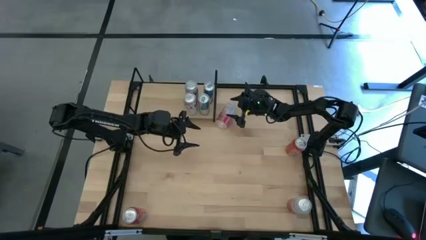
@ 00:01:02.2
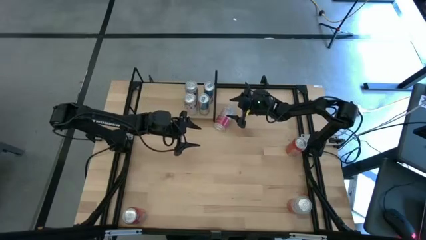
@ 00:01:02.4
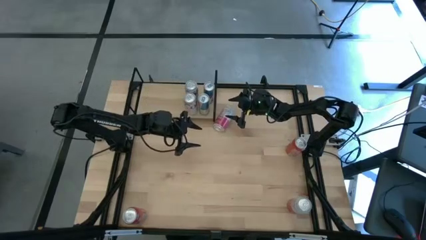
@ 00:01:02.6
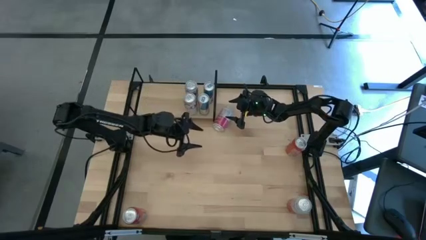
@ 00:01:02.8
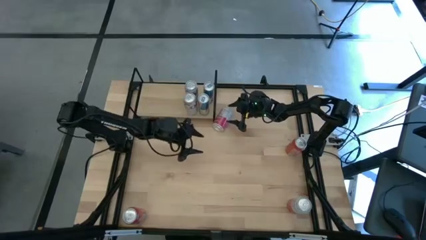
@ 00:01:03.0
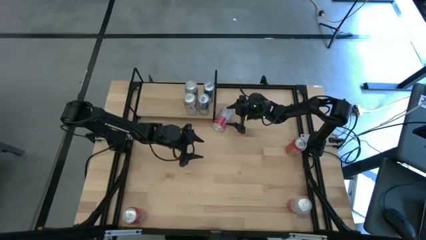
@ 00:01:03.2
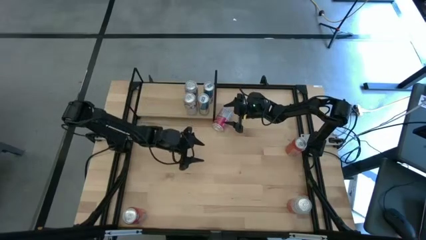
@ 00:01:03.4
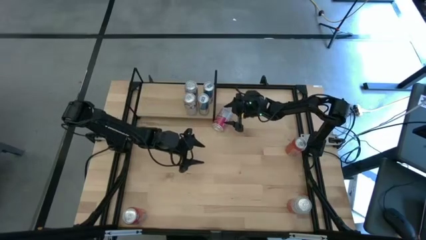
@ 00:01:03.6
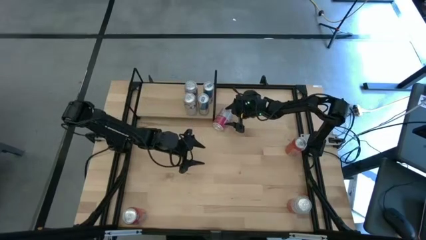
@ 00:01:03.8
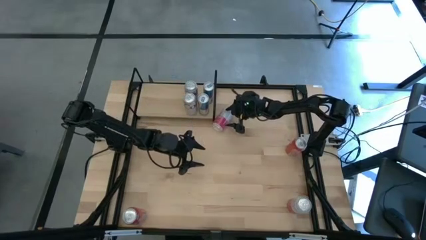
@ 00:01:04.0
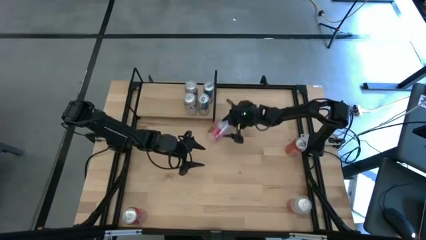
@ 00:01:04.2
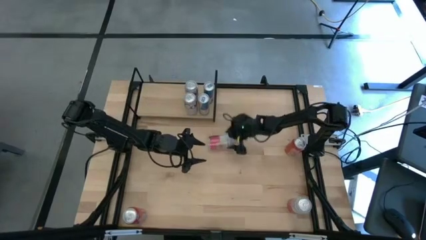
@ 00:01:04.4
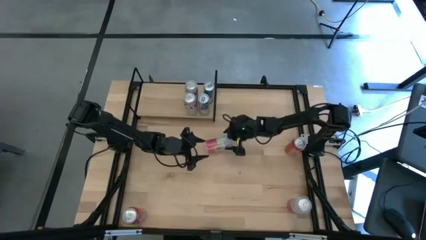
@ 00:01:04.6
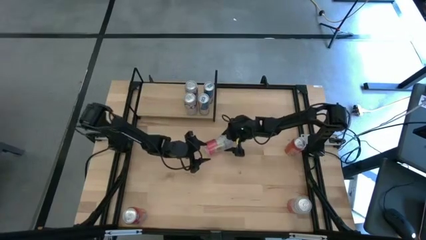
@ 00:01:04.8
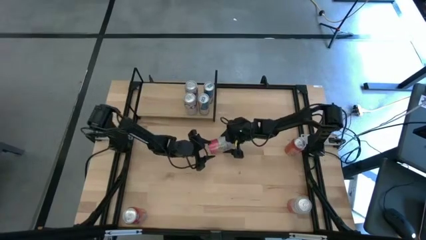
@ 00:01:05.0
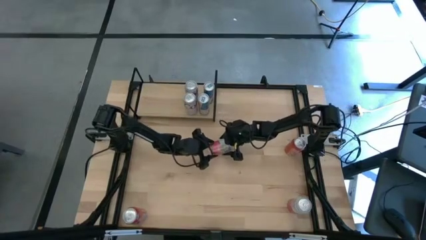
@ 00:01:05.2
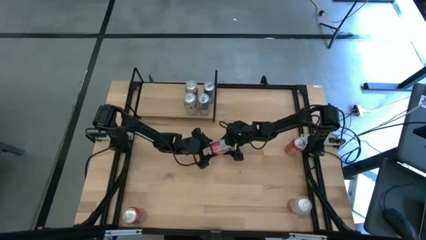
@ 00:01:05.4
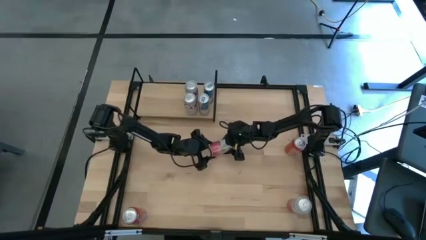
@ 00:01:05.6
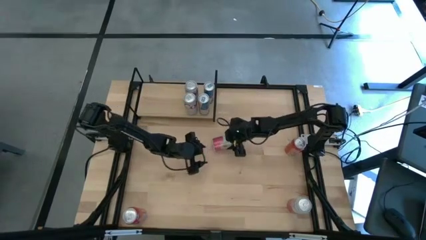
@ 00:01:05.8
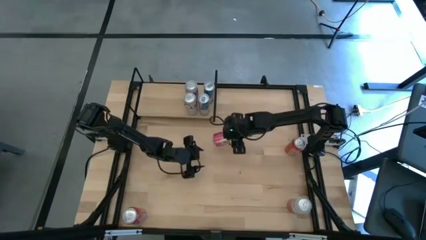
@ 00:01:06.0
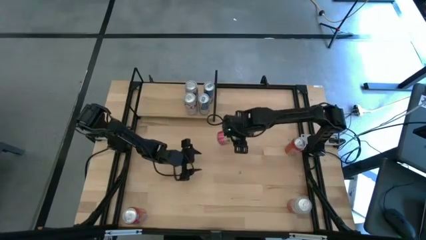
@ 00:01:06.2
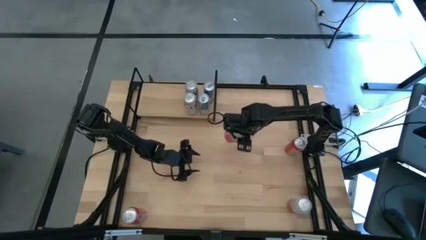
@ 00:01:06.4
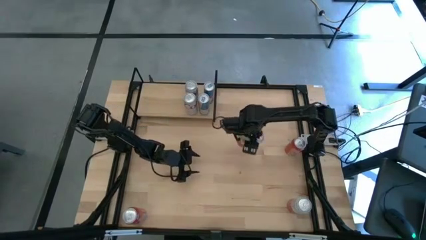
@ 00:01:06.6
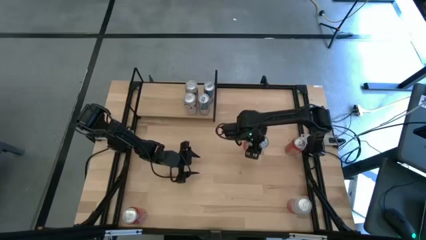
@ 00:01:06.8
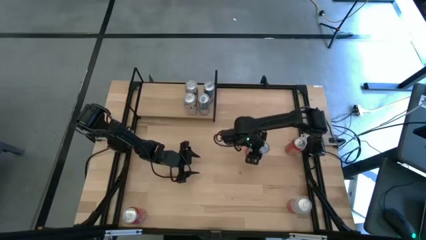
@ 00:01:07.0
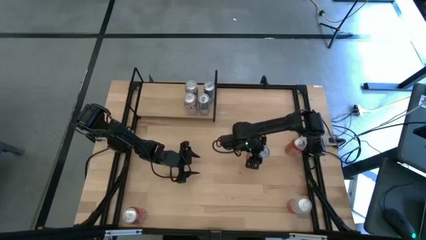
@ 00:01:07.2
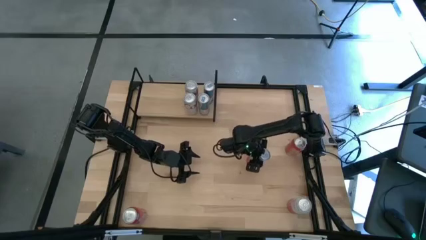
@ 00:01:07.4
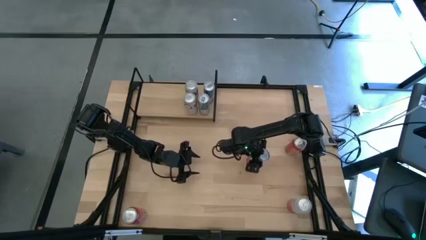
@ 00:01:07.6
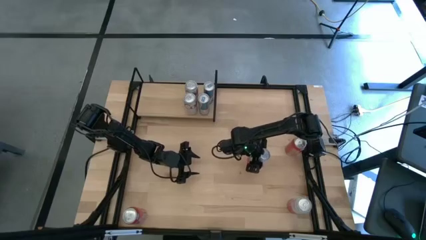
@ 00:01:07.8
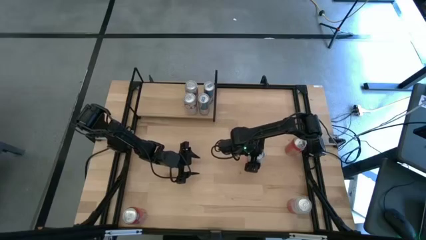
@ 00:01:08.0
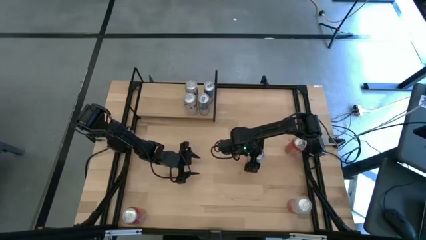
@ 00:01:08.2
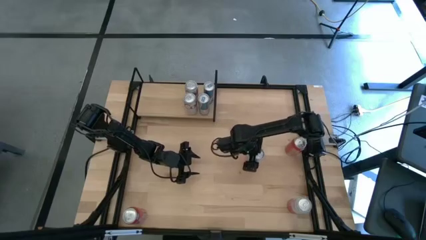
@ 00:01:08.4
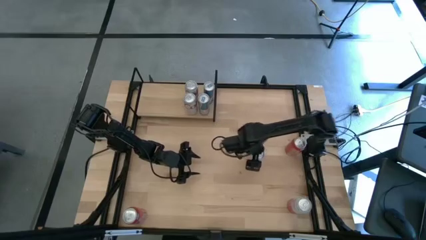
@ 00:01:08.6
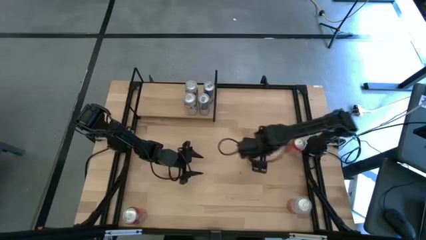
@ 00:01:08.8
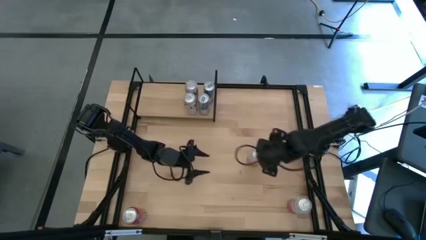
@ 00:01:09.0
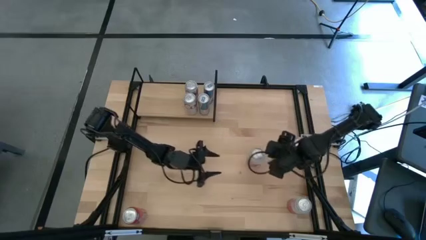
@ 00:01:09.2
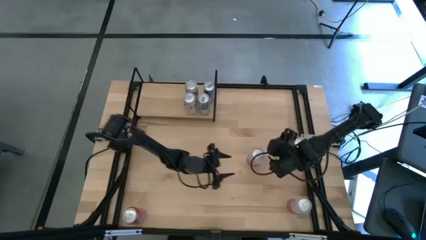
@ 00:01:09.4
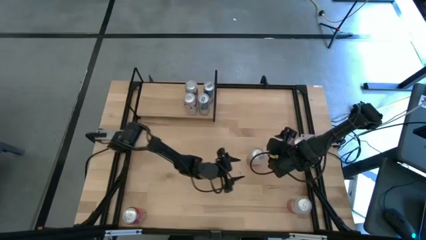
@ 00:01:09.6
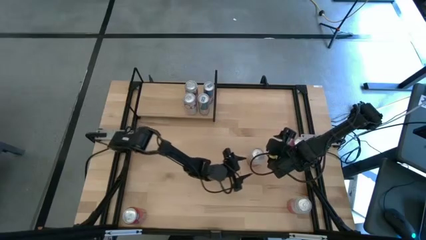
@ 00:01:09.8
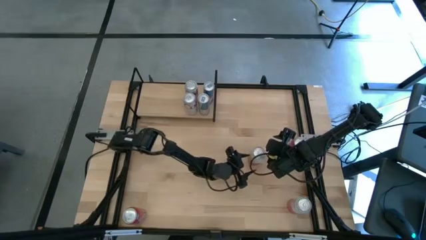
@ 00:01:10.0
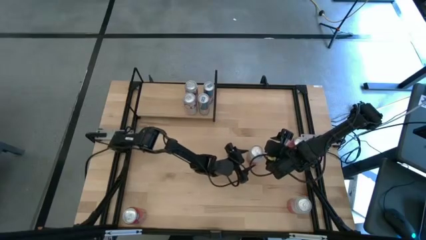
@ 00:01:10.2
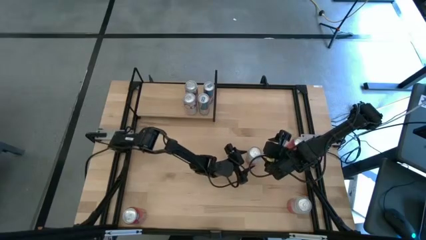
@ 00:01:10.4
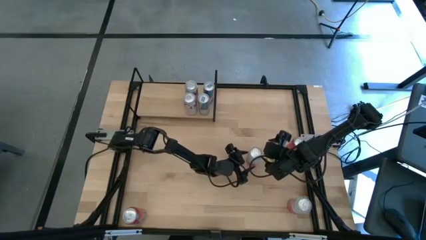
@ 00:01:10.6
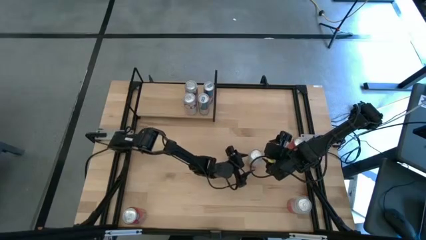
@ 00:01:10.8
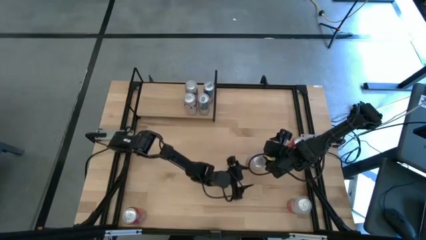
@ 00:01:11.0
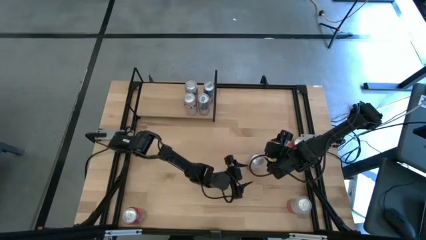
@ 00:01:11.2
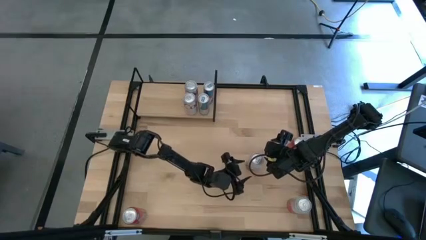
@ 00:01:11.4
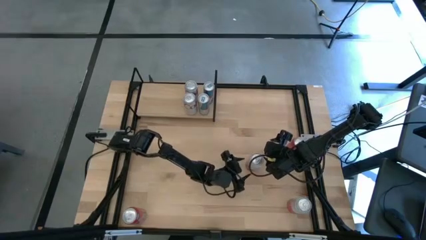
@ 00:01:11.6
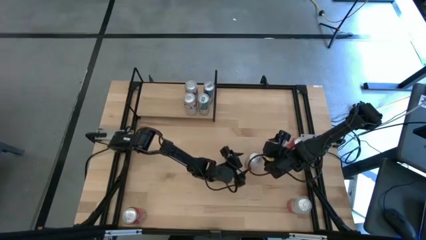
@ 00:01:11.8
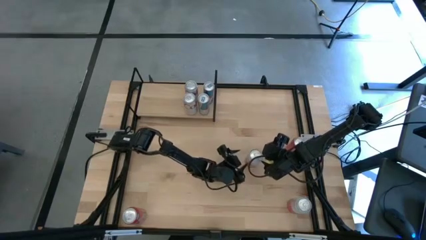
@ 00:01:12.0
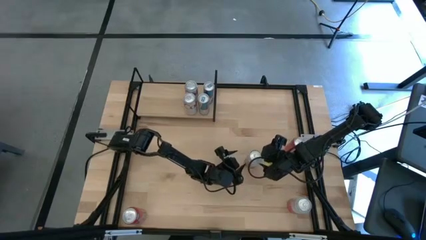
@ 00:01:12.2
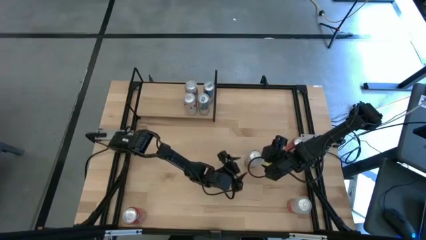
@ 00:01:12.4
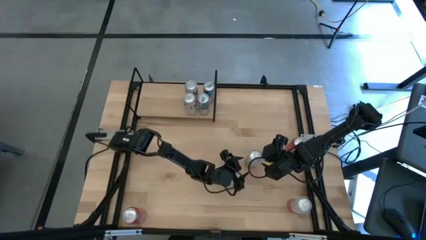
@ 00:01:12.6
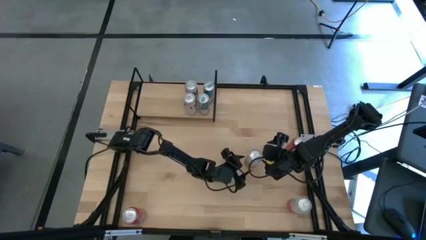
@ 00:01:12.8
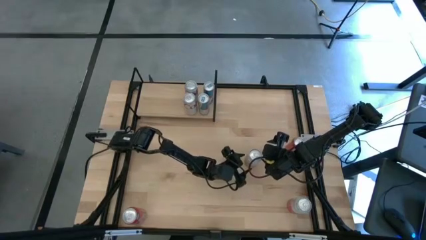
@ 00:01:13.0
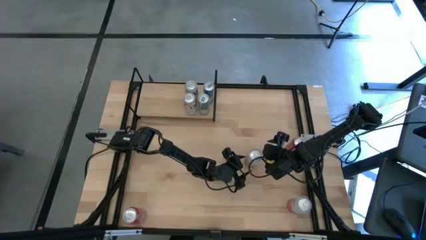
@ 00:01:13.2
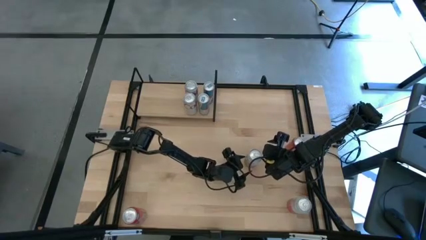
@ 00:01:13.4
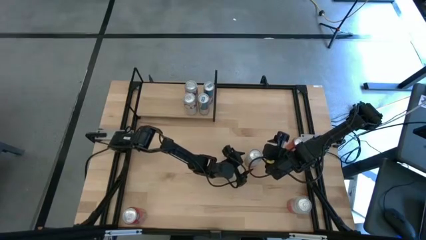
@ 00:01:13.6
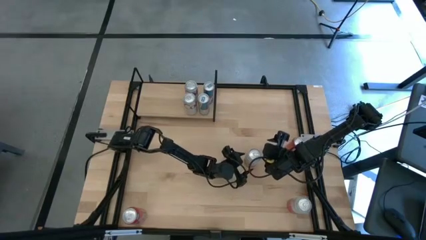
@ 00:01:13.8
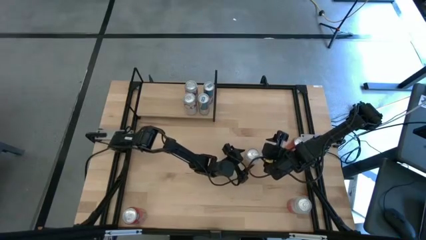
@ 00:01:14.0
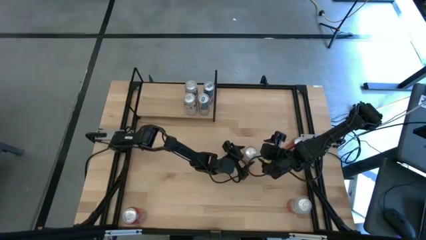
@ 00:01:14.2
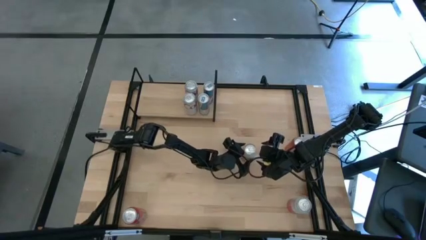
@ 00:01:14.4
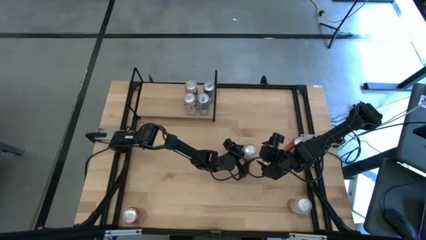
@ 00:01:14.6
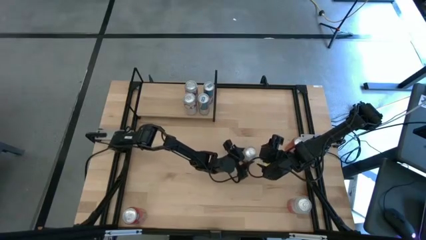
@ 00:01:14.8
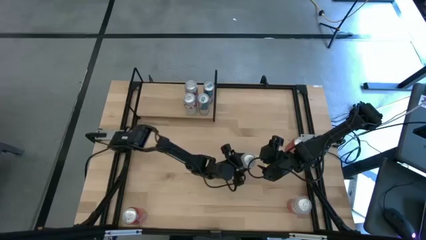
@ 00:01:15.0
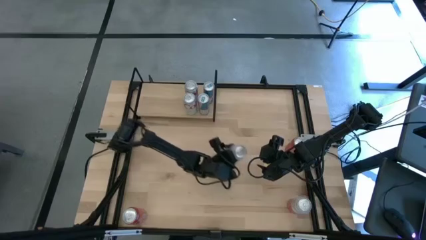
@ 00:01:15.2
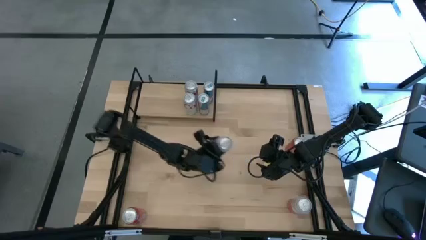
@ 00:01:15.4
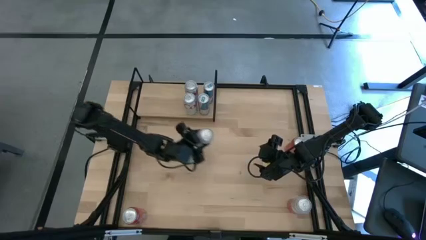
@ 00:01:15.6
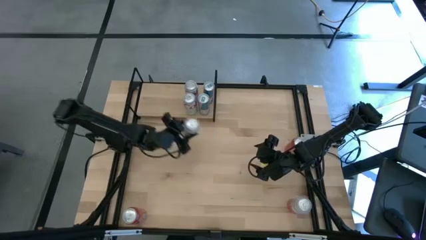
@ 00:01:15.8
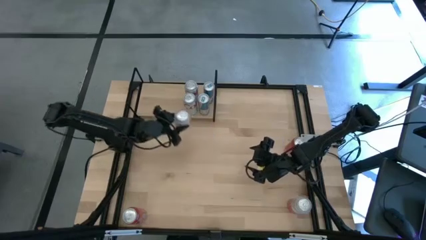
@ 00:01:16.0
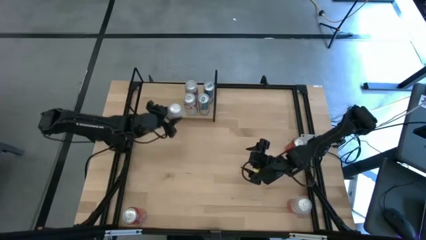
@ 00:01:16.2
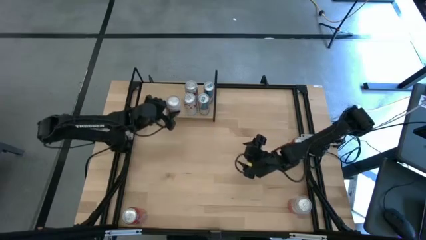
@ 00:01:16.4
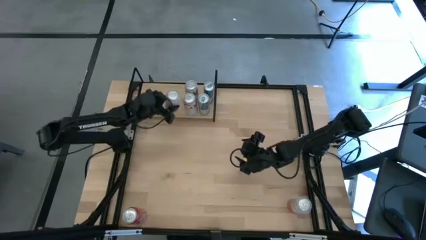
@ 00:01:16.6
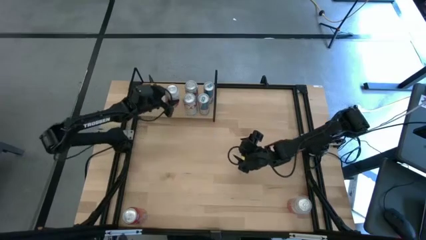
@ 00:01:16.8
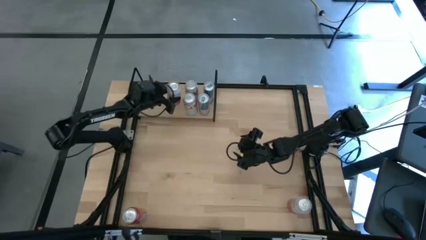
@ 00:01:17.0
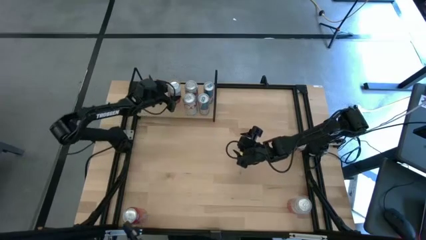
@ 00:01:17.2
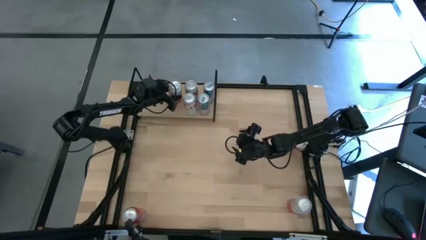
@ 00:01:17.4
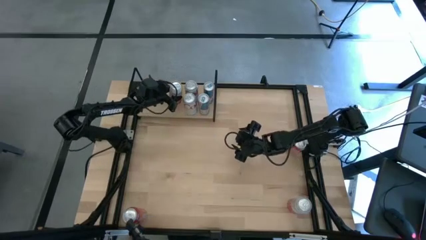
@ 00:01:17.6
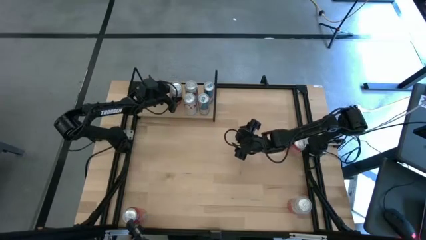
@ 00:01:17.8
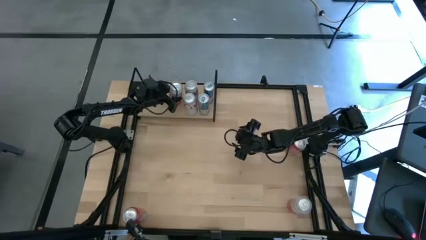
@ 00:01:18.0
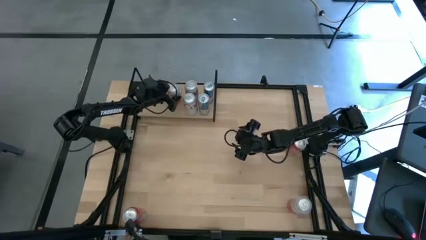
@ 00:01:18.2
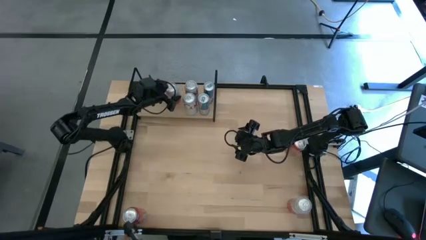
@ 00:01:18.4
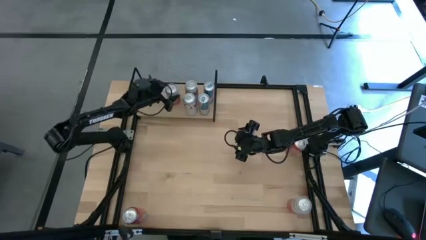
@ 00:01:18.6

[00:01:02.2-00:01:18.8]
Task: Place canned beverage on shelf
Put the top pink soda can on the shelf
